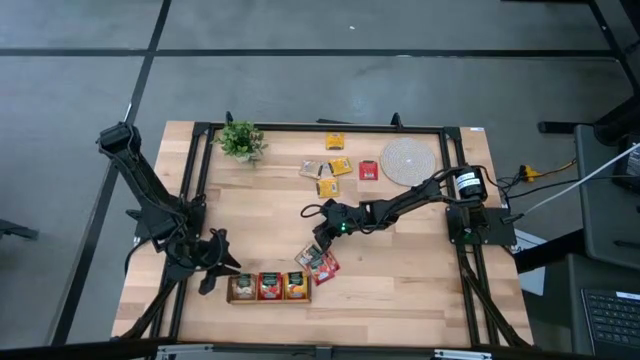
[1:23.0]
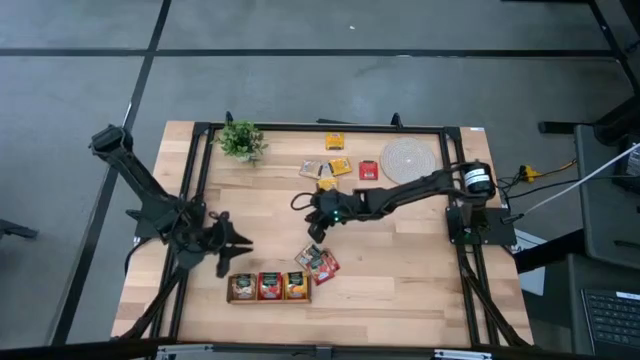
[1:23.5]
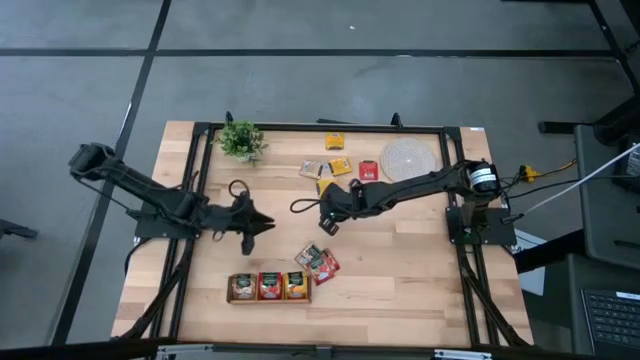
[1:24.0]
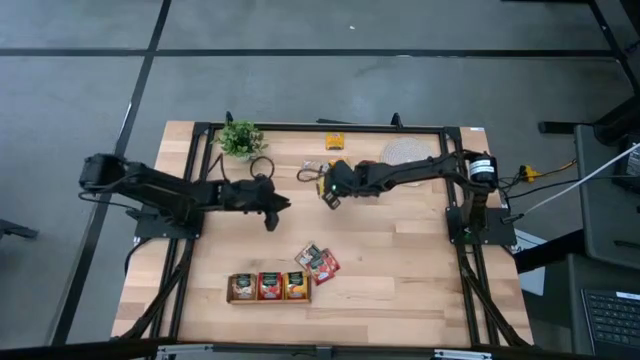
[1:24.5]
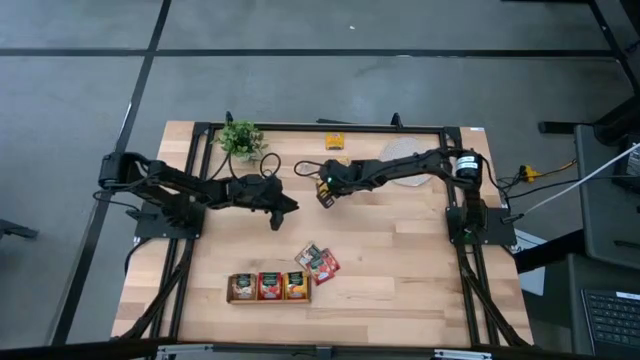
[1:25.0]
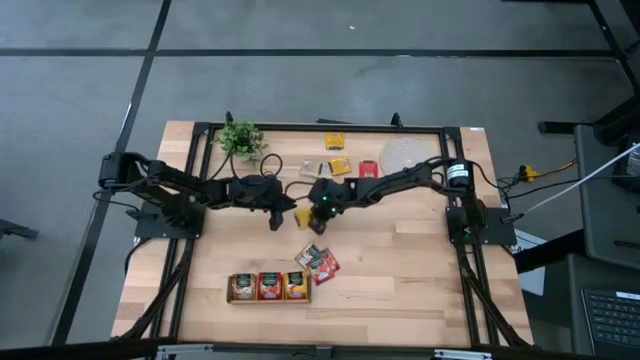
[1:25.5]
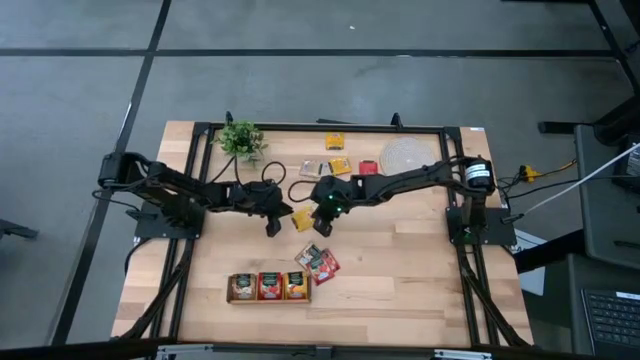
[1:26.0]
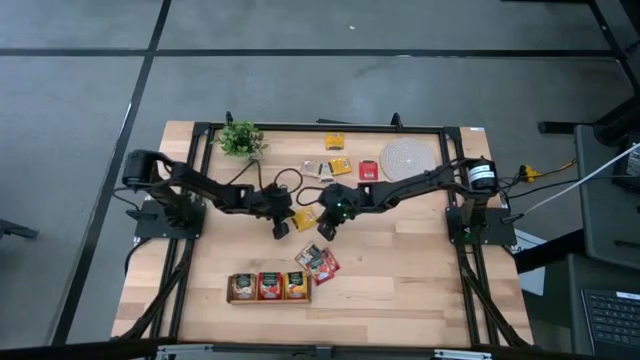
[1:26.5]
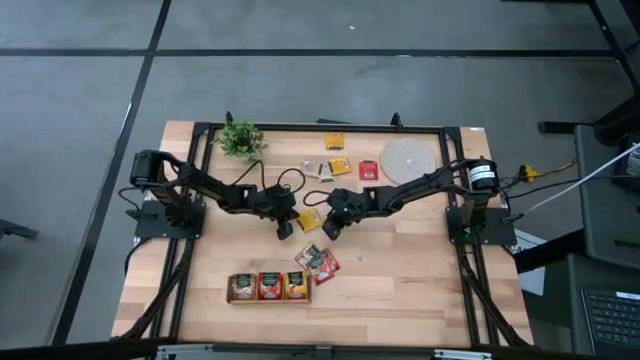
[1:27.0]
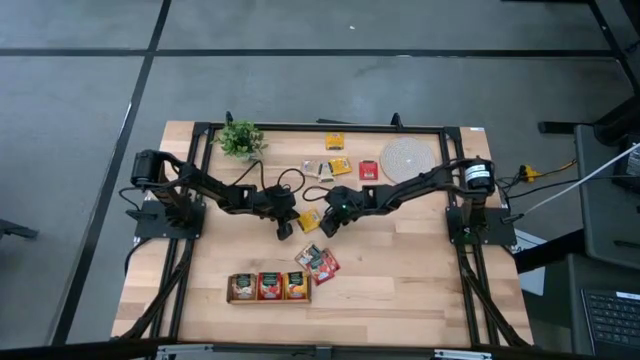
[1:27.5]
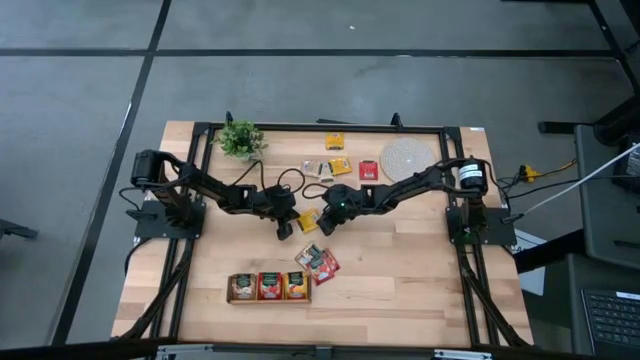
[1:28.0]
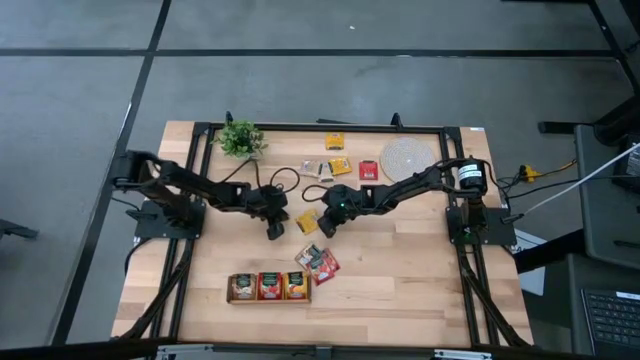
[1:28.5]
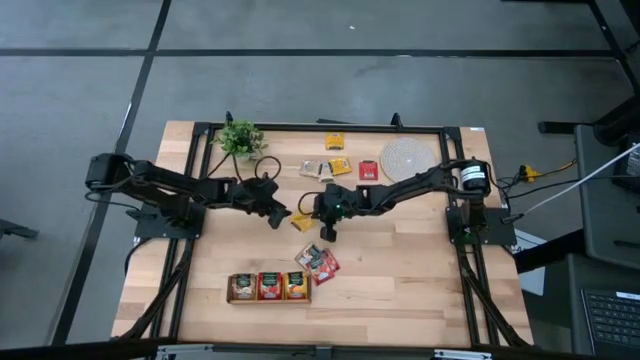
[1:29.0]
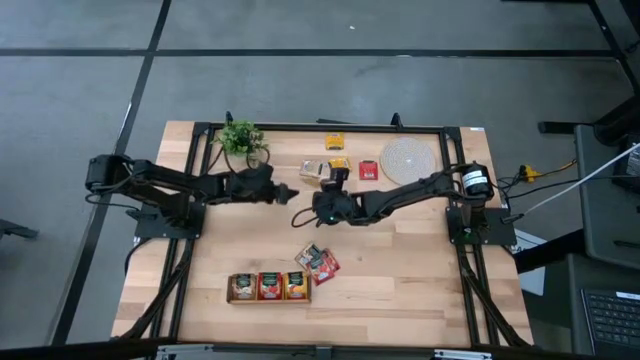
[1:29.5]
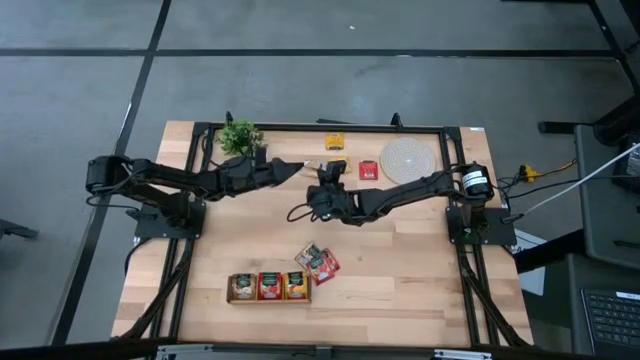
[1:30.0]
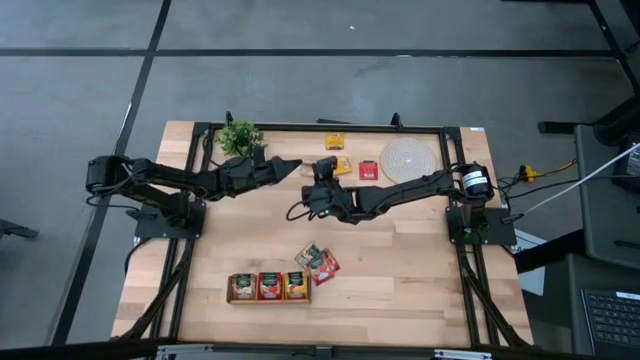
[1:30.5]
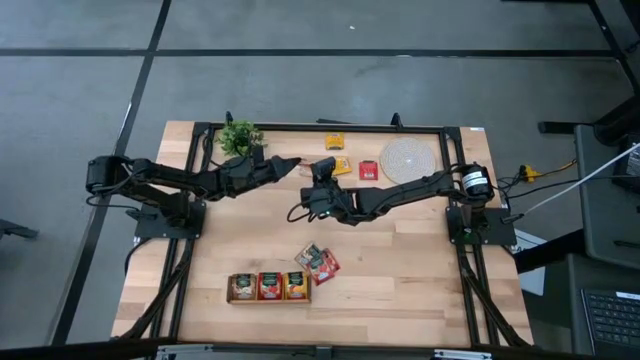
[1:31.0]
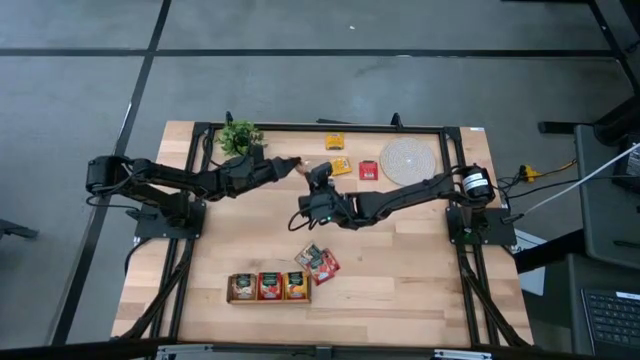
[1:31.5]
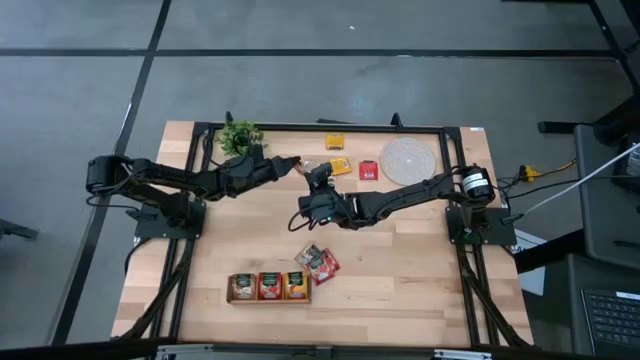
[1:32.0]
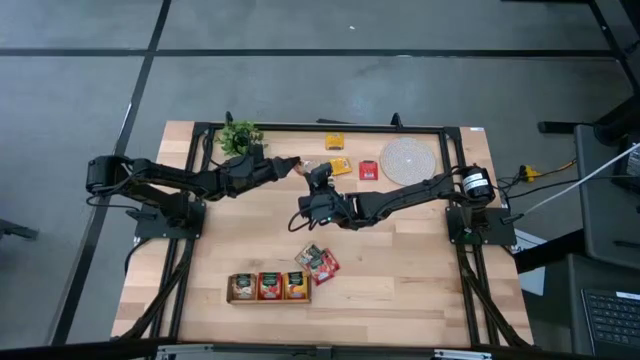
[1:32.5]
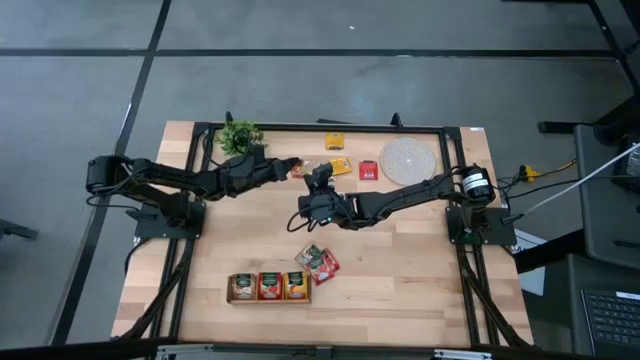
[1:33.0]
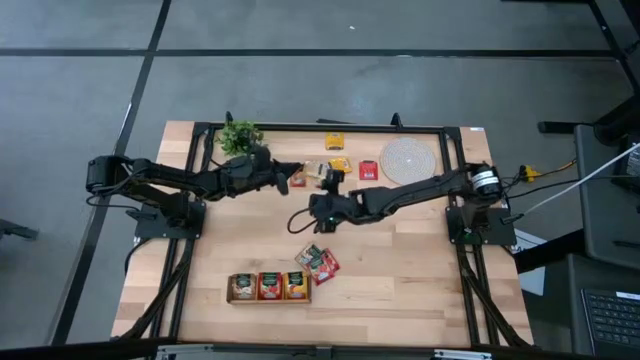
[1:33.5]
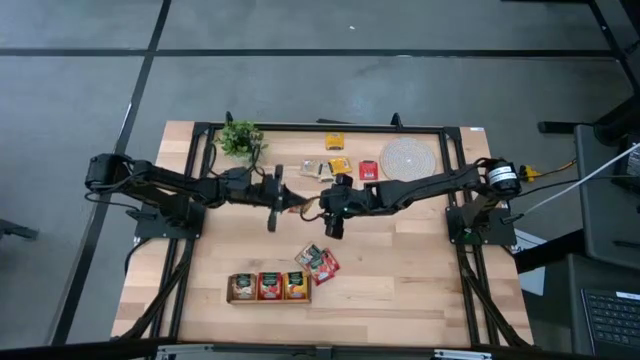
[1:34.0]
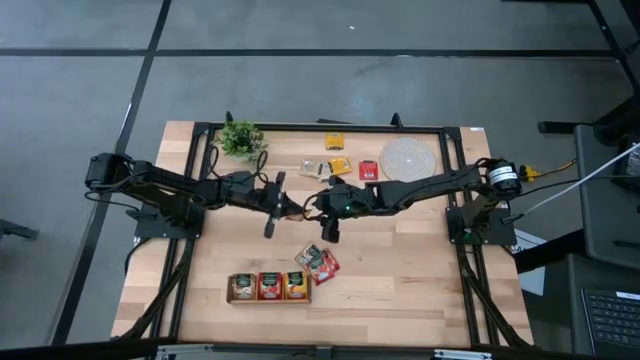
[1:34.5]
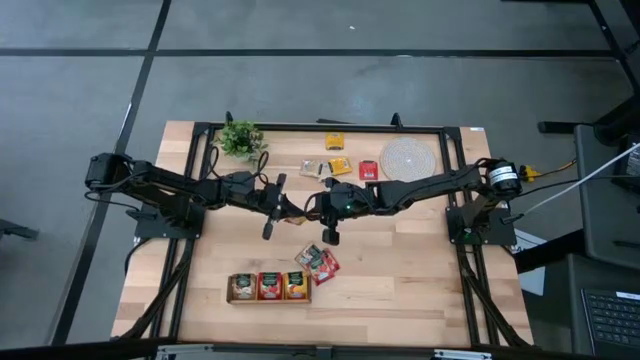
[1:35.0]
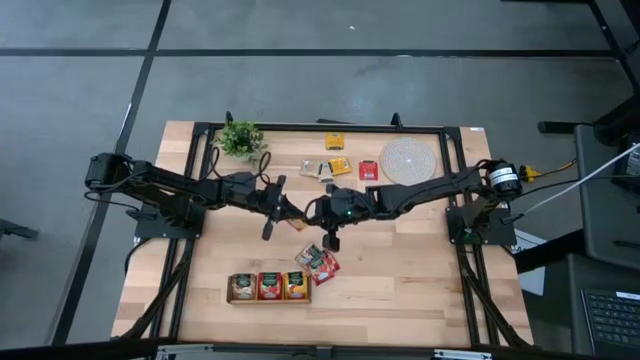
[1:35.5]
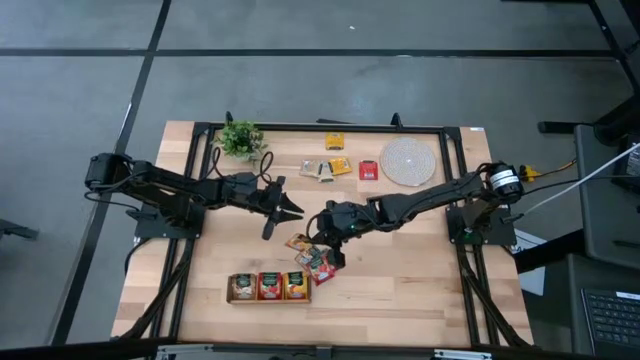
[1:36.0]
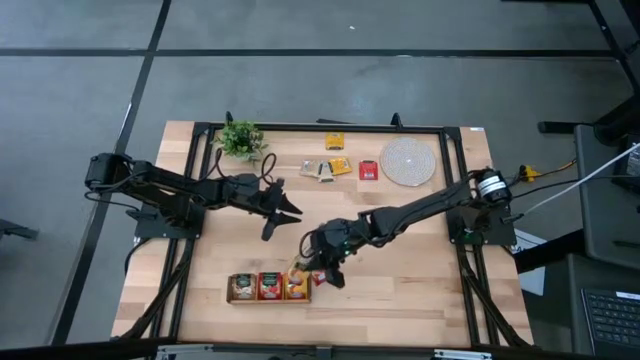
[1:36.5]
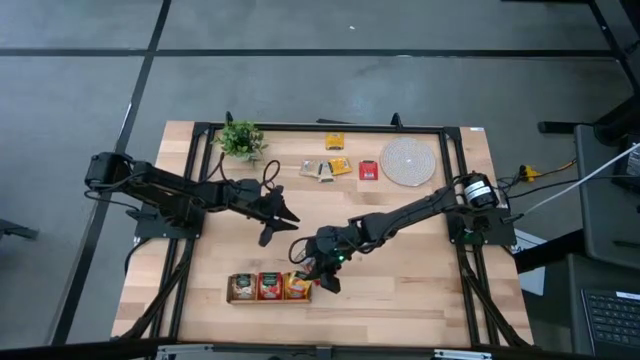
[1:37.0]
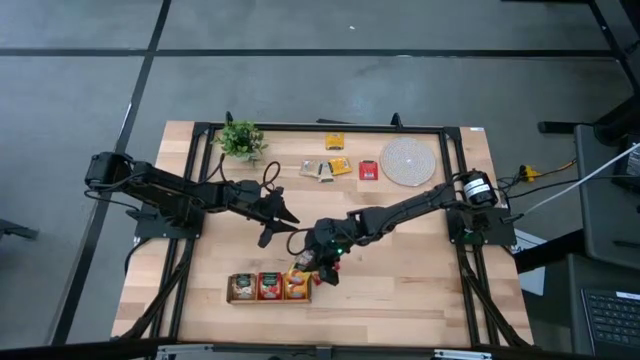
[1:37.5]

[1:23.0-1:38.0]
Task: Pick & Place Tea
Put the yellow tea bag into the right section of the wooden organizer

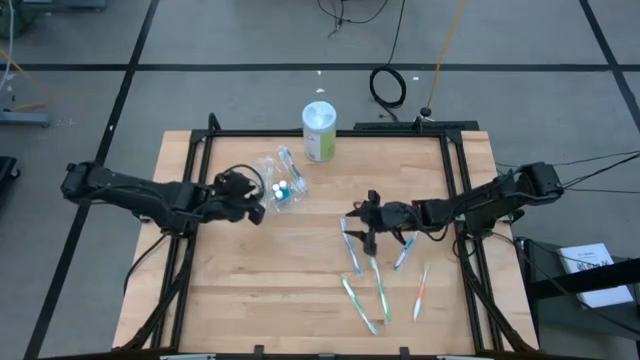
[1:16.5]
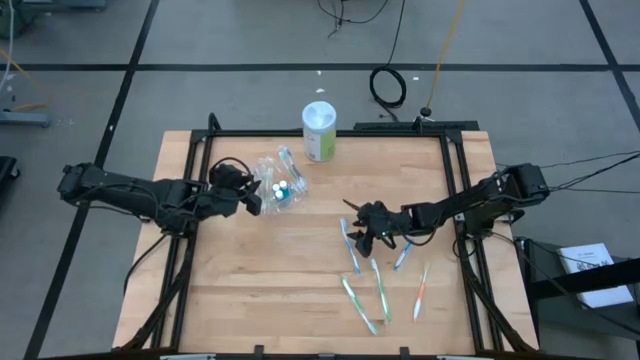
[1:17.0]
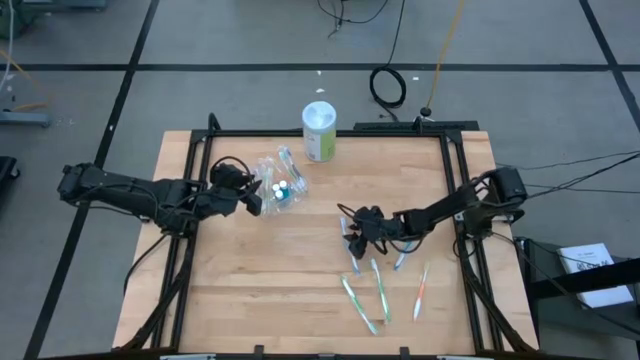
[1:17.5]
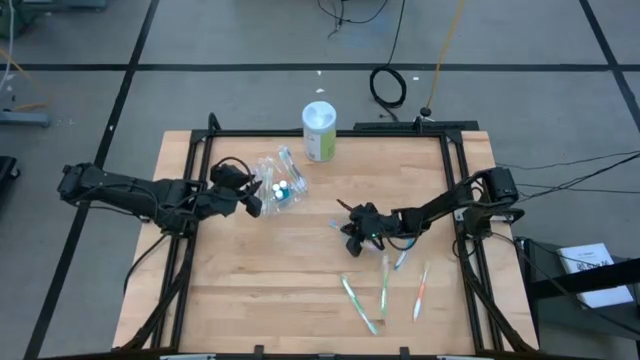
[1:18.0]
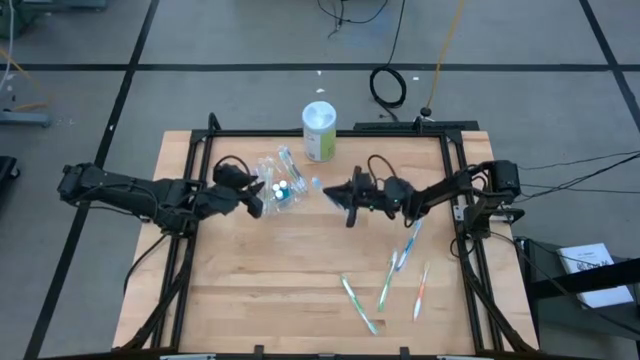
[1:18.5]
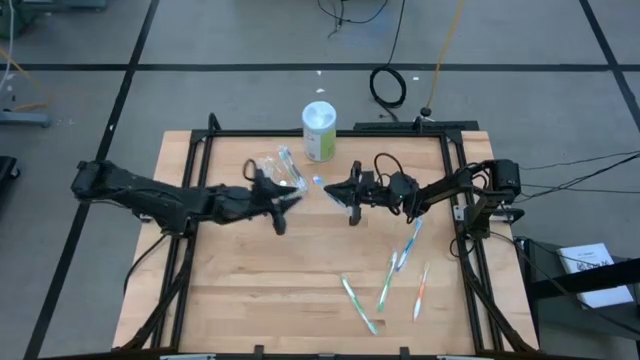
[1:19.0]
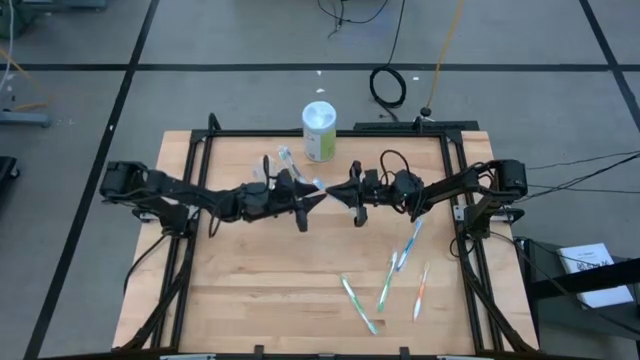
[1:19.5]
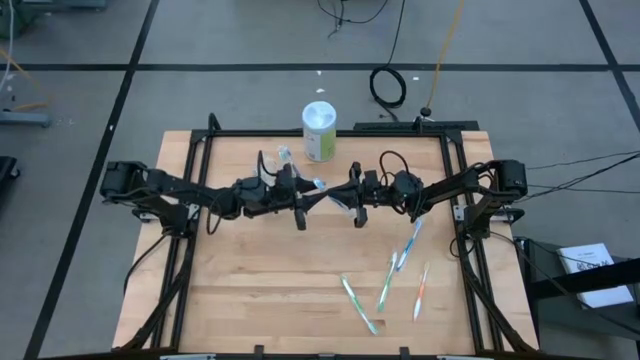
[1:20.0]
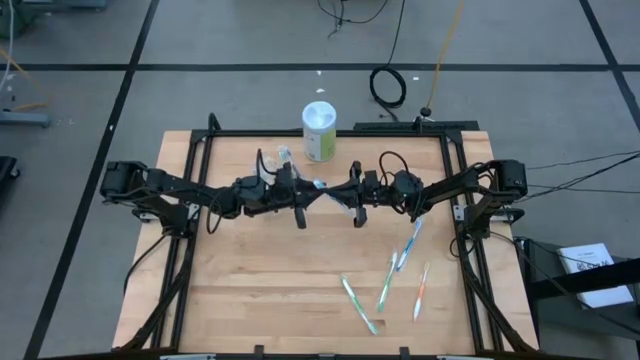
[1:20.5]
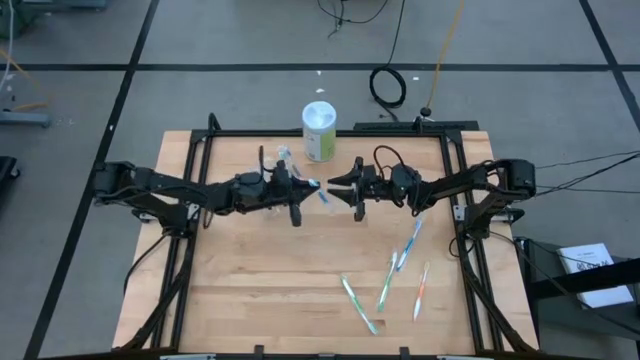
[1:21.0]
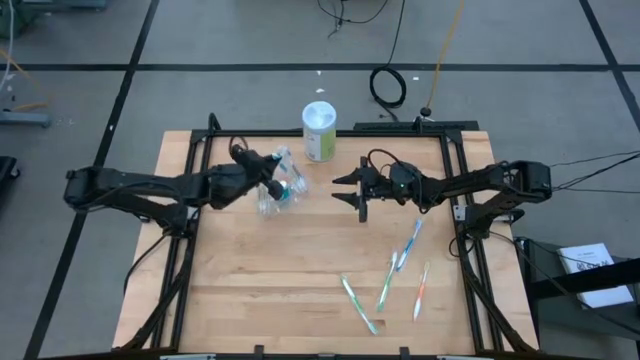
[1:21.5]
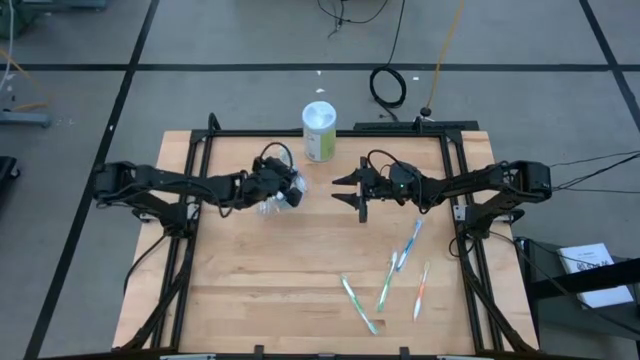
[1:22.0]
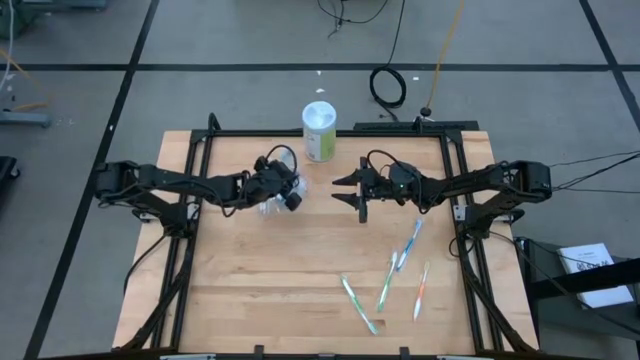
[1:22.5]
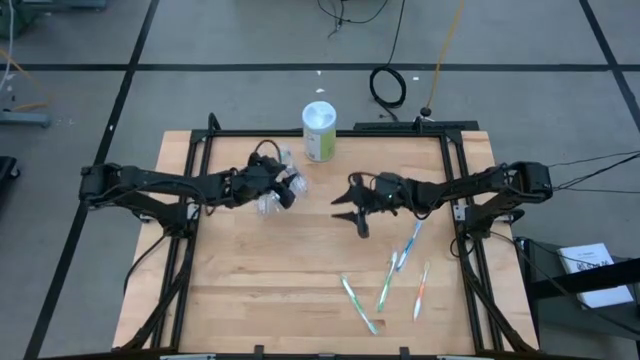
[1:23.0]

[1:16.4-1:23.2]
Task: Pick & Place toothbrushing station
Put the blue toothbrush into the transparent organizer
